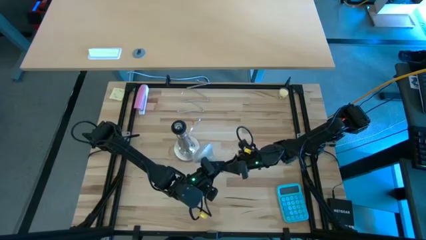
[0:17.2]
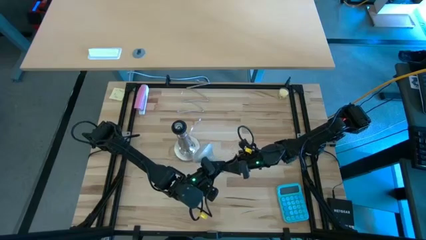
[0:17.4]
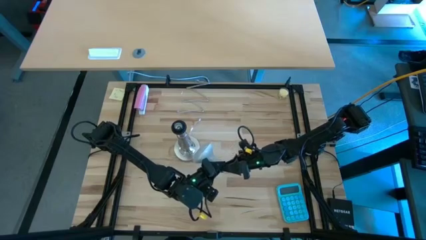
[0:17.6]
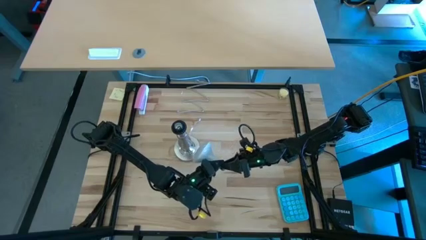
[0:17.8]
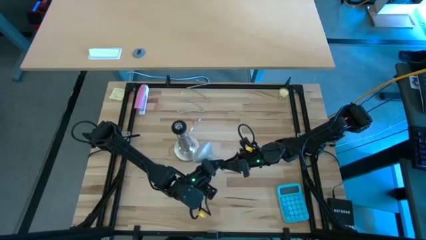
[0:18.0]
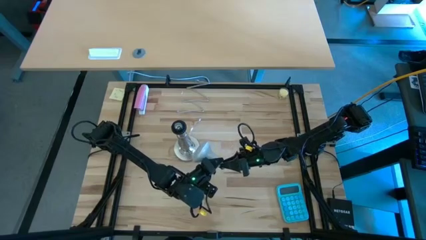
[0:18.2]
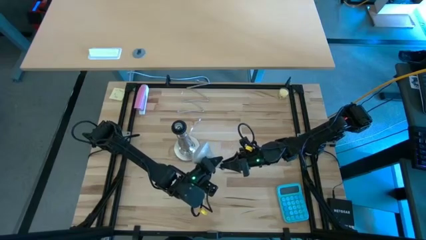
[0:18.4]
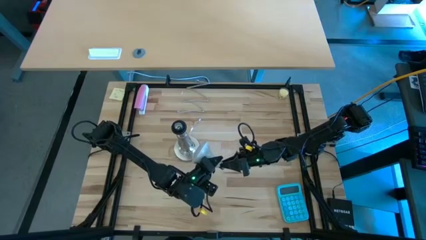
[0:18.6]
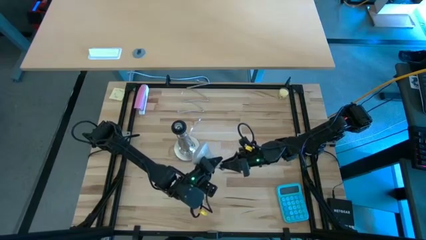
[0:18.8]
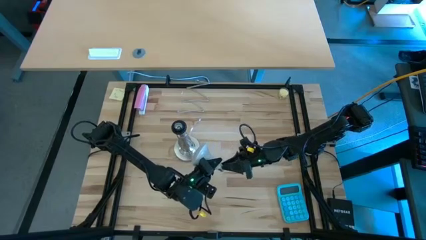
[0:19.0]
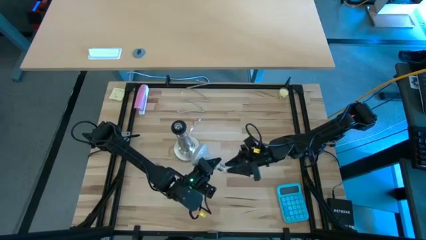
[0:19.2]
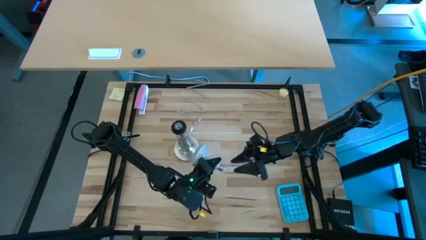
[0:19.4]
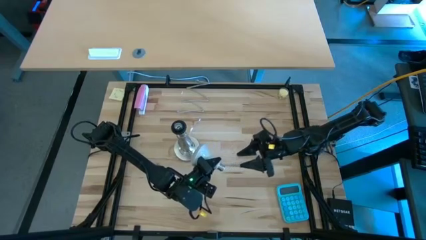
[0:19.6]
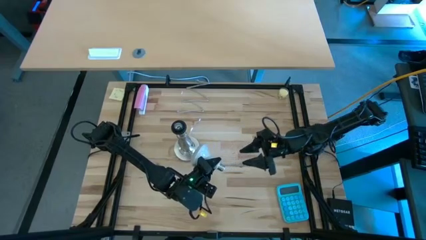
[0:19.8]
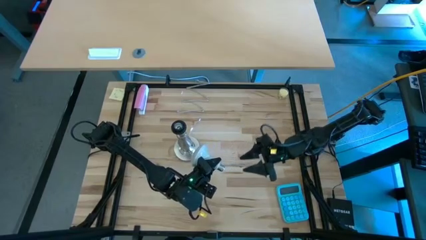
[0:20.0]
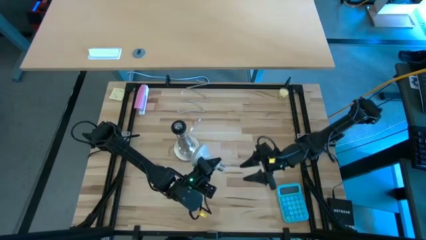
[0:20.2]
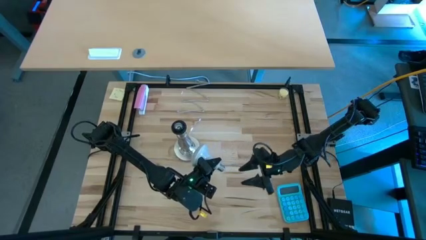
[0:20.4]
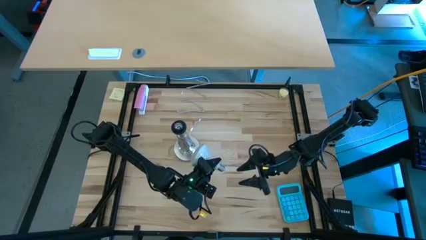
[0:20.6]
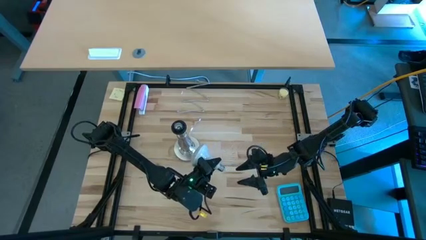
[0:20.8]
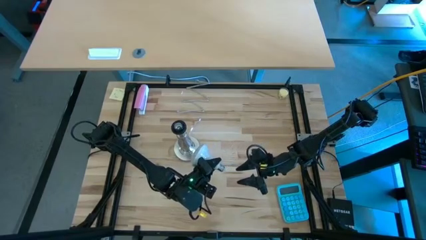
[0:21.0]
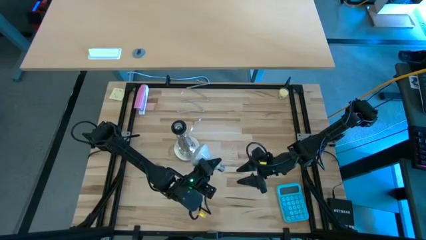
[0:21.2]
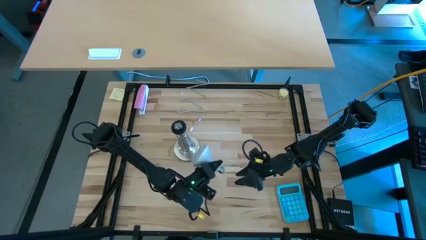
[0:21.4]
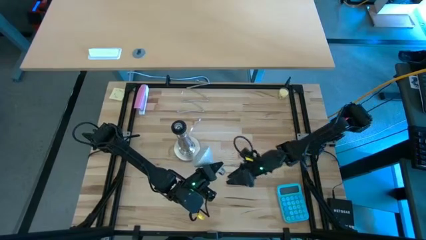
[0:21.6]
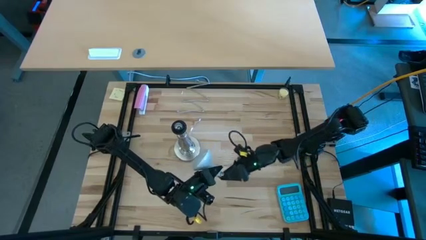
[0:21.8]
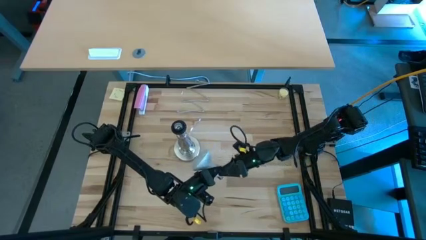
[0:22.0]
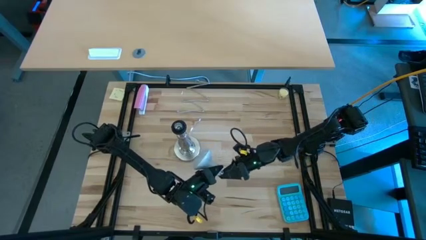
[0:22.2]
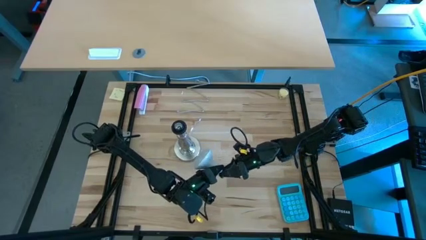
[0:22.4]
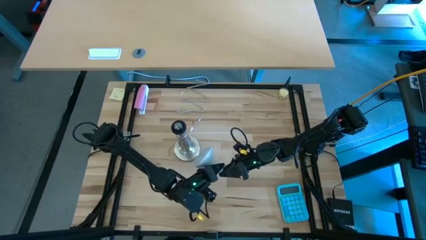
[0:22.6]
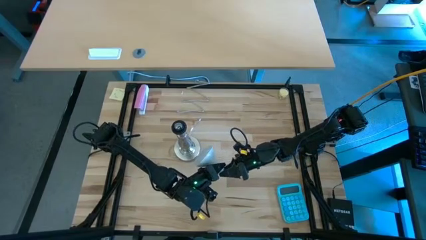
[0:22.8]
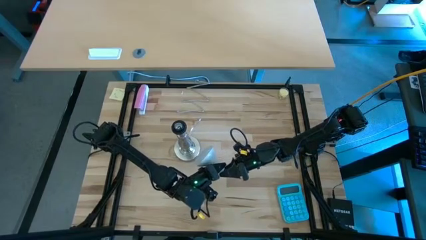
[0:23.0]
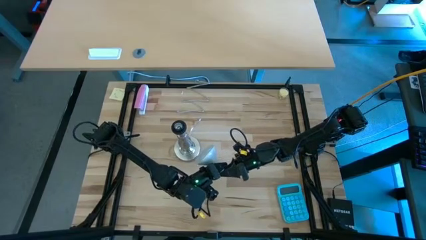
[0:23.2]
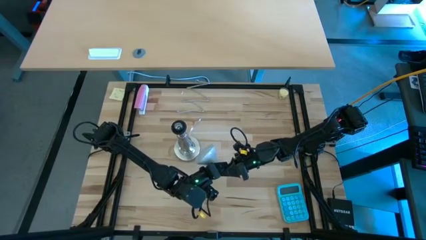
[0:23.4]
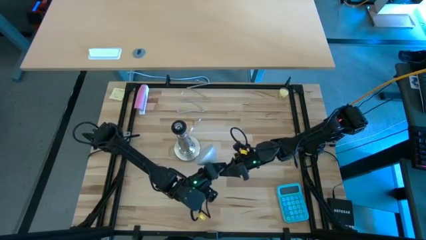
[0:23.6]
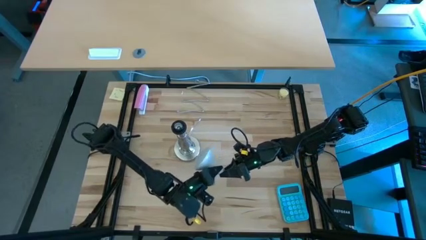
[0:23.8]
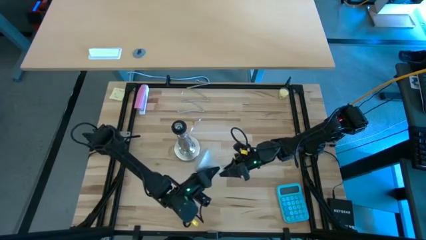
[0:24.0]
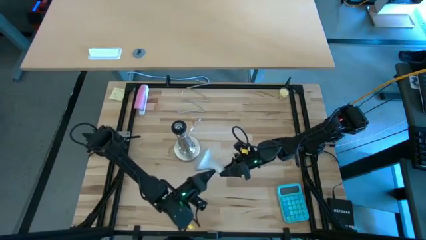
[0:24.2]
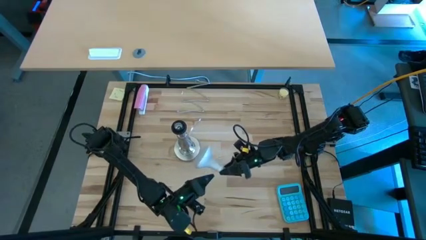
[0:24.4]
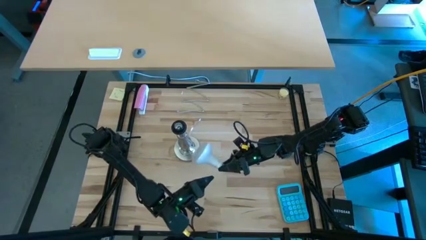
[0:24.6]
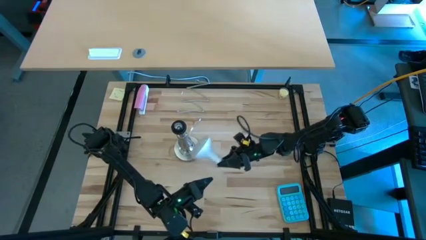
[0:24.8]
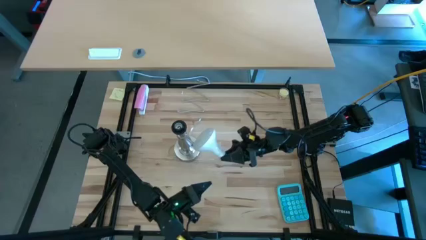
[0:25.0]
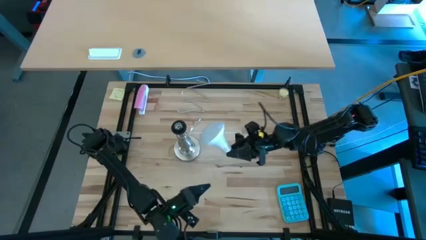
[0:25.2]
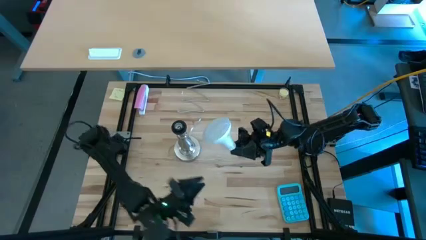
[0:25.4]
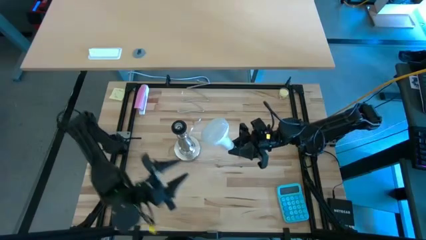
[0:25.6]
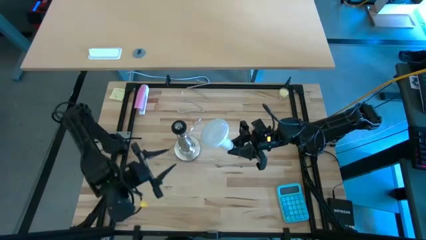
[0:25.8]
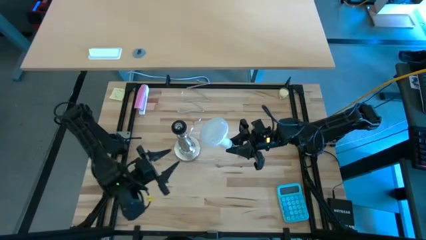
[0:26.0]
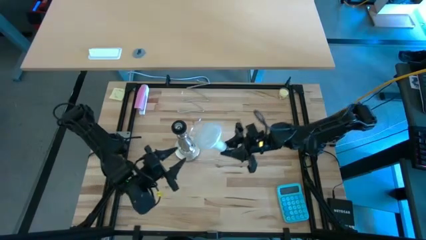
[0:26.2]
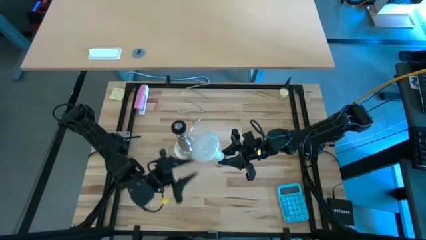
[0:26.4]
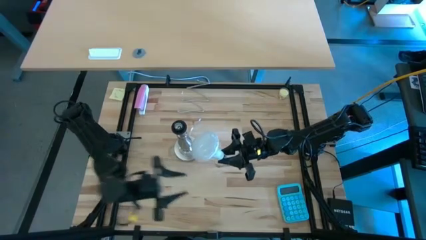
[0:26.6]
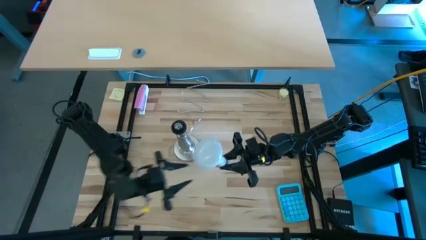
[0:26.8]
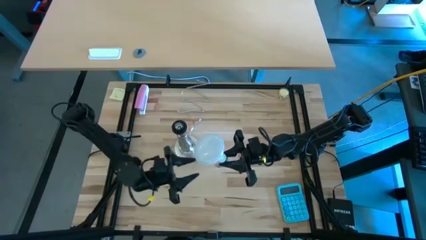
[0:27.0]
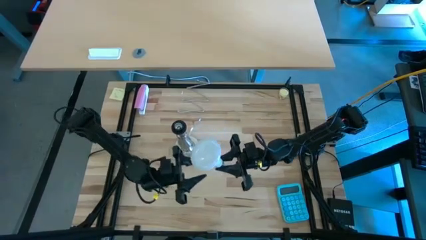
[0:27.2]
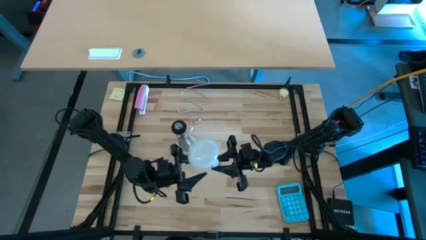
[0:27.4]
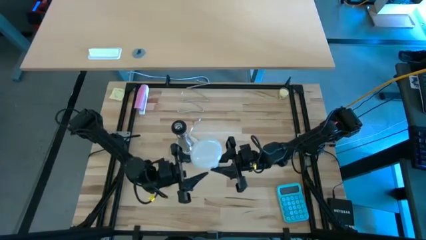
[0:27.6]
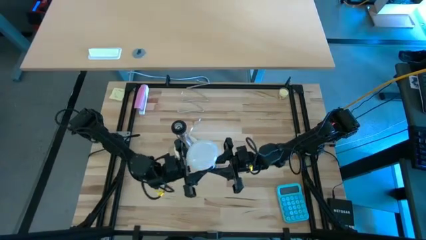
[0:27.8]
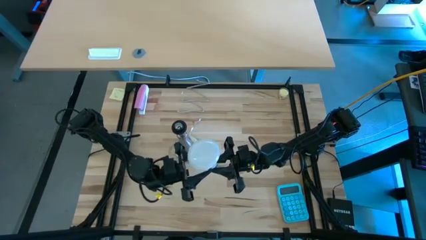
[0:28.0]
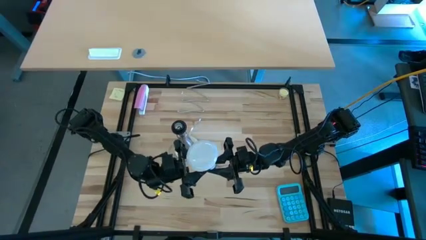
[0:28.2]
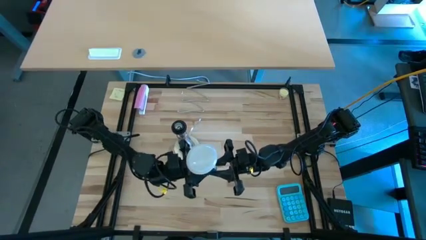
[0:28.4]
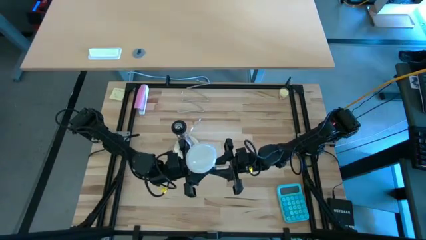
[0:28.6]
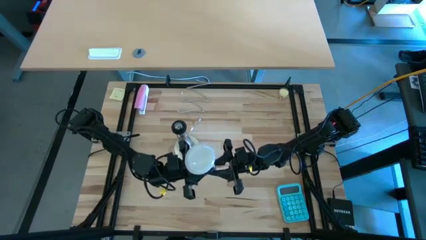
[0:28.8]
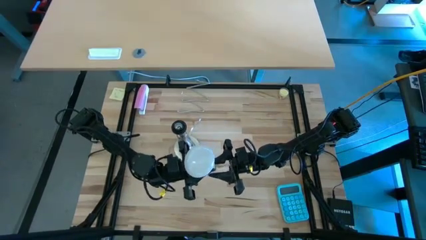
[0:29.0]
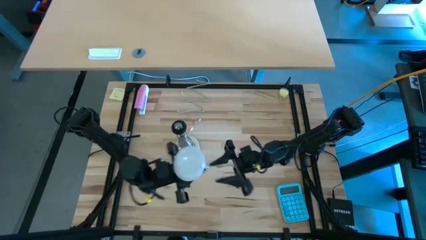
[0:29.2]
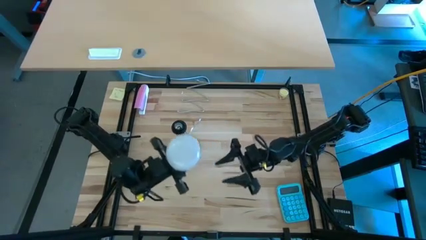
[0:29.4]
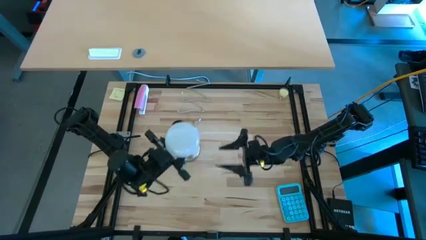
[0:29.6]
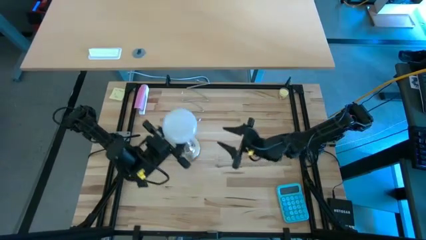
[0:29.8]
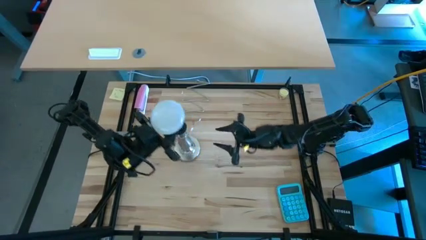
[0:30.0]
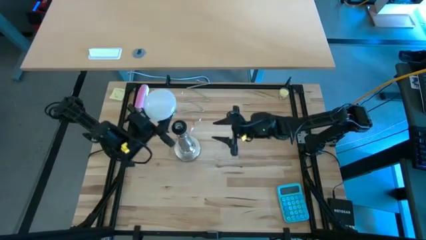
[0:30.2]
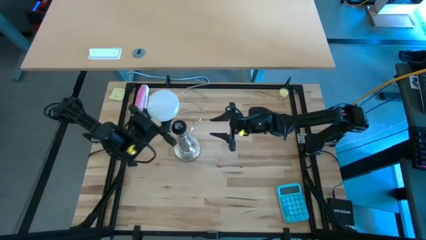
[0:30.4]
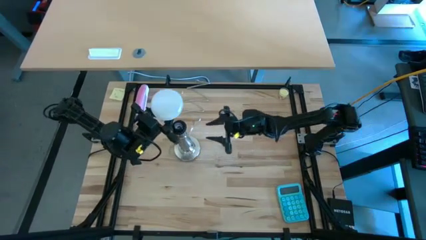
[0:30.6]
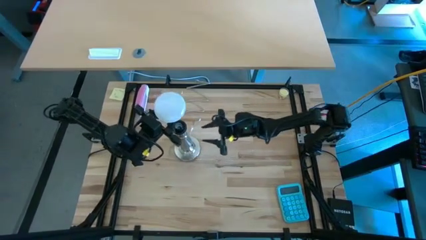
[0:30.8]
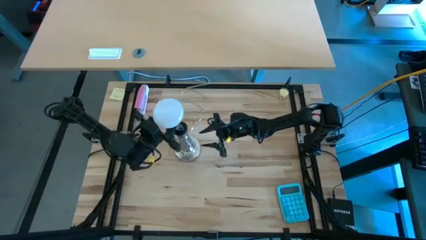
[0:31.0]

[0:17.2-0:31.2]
Task: Screw lightbulb
Insert the lightbulb into the desk lamp
